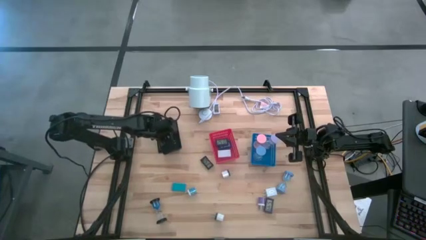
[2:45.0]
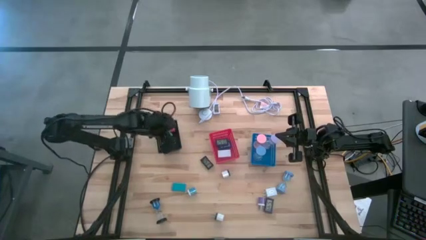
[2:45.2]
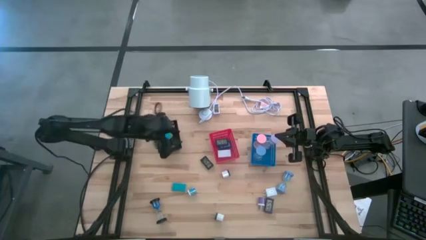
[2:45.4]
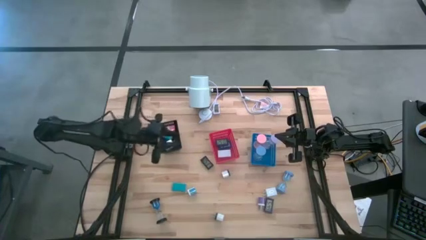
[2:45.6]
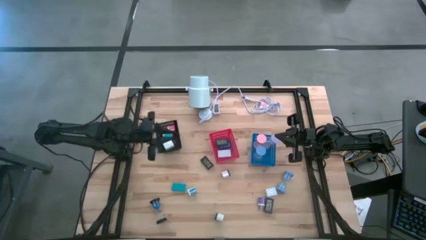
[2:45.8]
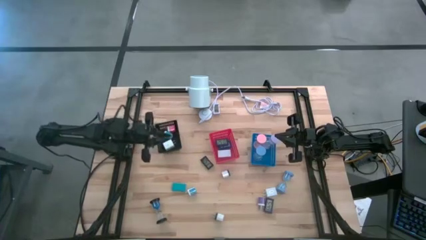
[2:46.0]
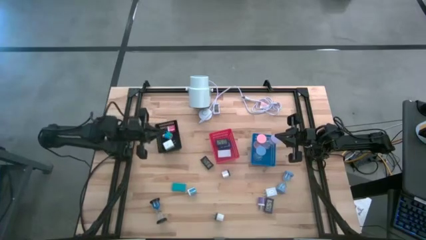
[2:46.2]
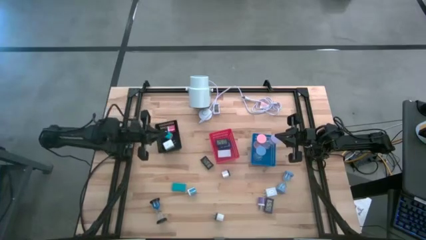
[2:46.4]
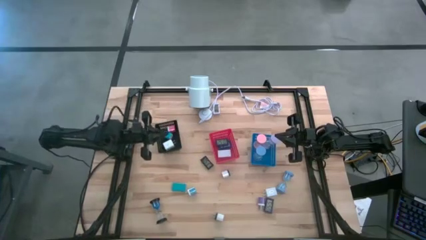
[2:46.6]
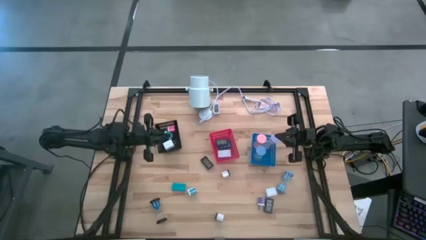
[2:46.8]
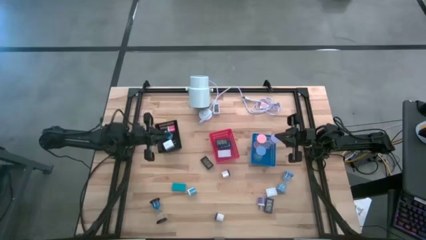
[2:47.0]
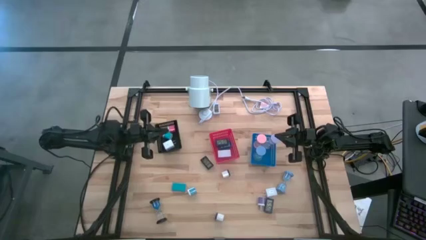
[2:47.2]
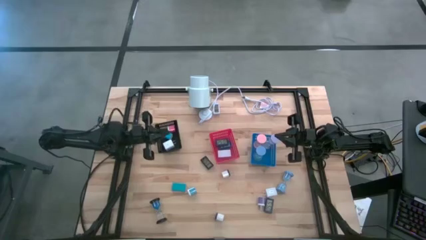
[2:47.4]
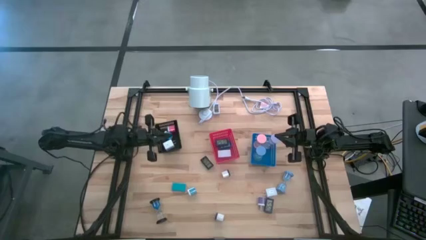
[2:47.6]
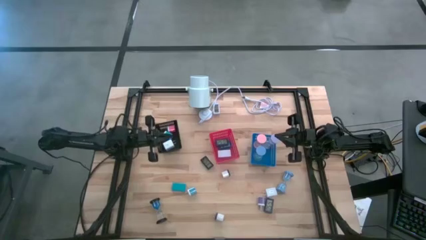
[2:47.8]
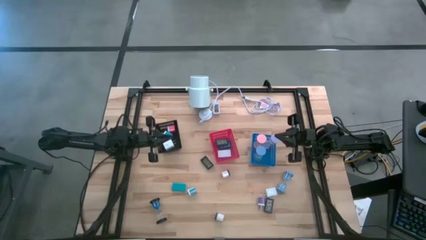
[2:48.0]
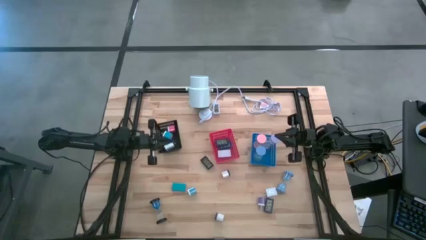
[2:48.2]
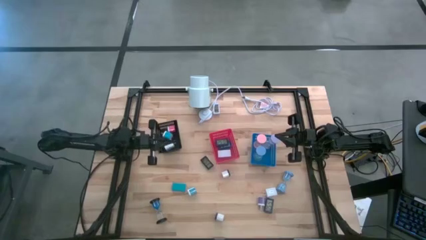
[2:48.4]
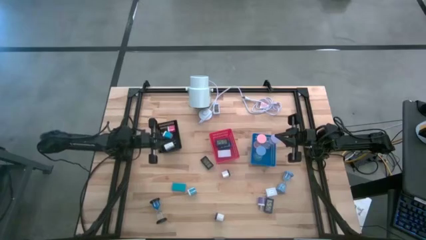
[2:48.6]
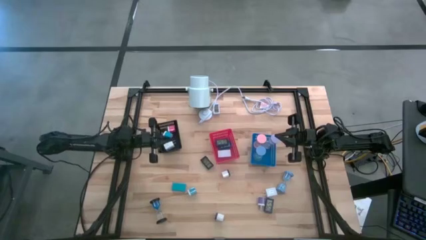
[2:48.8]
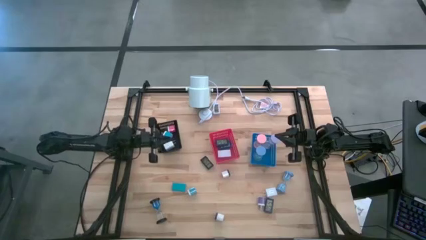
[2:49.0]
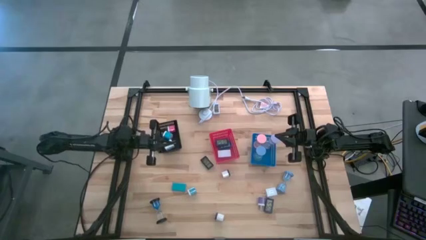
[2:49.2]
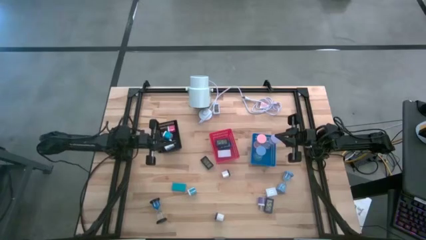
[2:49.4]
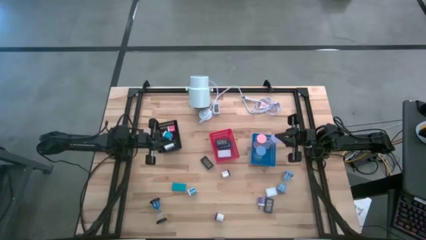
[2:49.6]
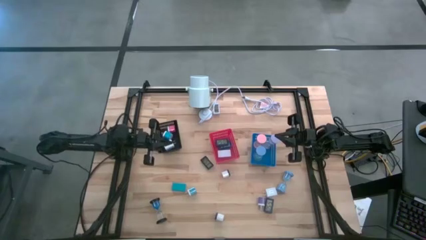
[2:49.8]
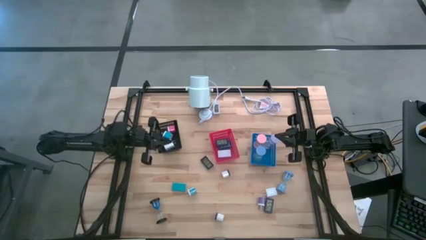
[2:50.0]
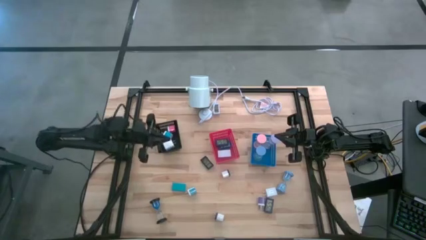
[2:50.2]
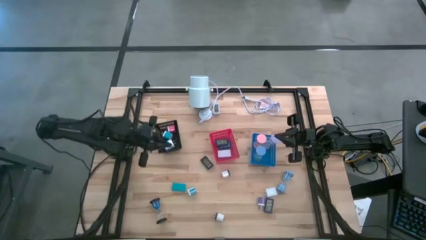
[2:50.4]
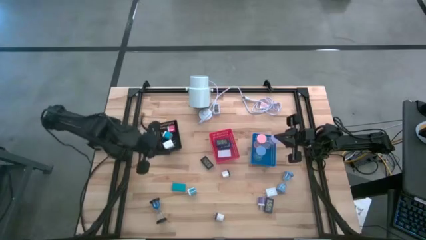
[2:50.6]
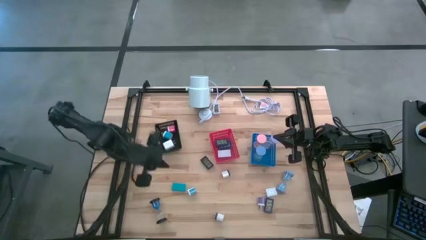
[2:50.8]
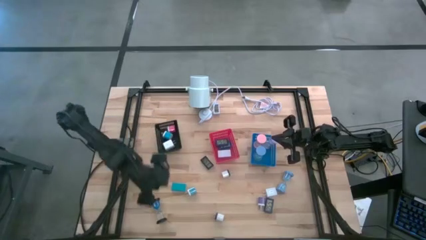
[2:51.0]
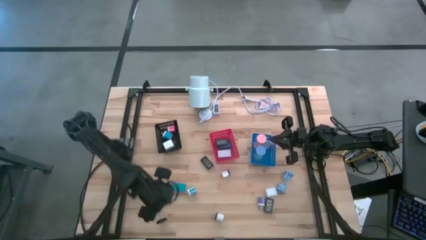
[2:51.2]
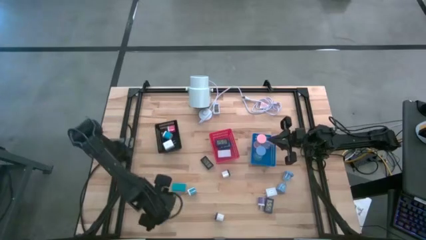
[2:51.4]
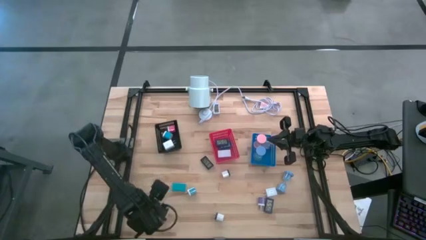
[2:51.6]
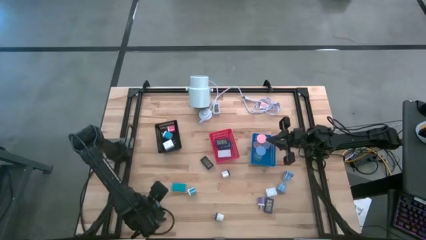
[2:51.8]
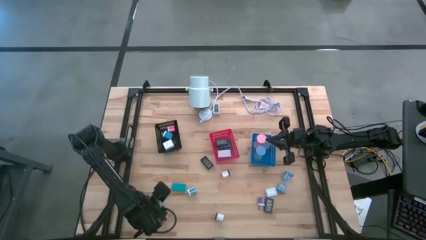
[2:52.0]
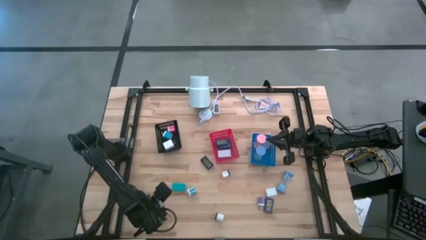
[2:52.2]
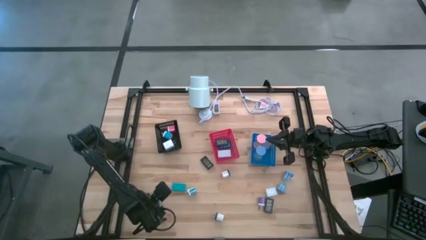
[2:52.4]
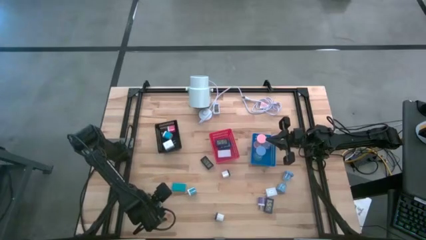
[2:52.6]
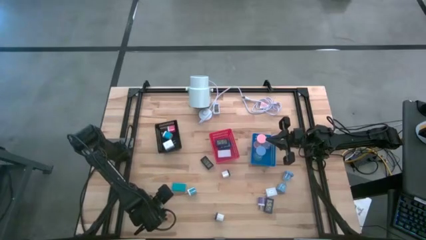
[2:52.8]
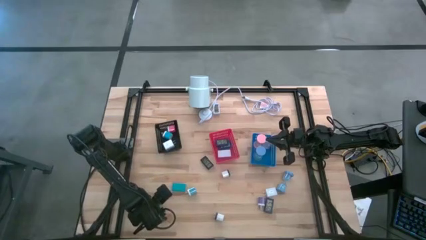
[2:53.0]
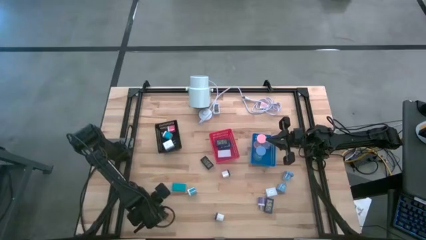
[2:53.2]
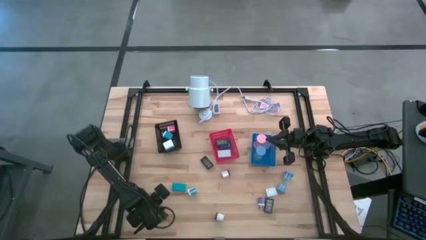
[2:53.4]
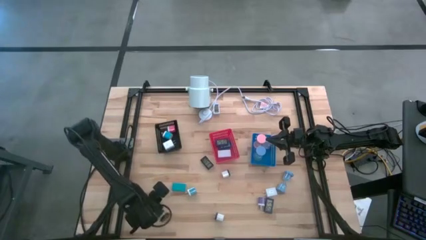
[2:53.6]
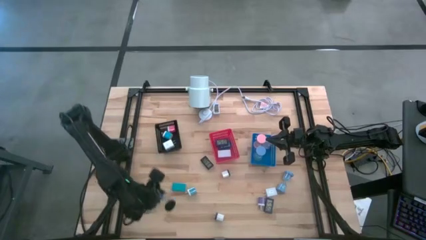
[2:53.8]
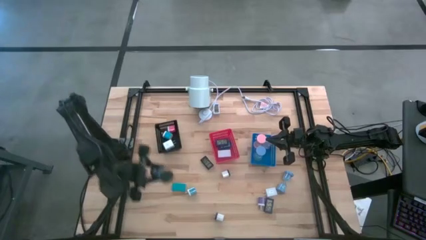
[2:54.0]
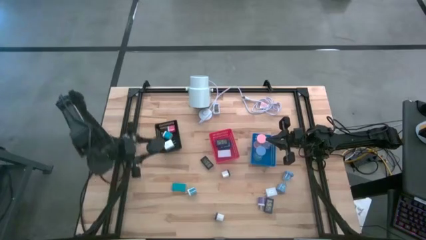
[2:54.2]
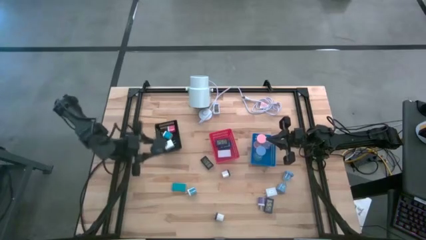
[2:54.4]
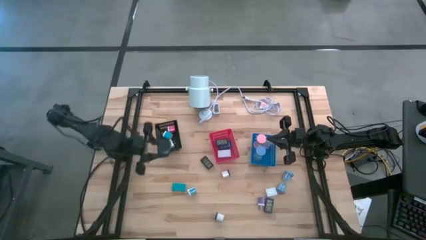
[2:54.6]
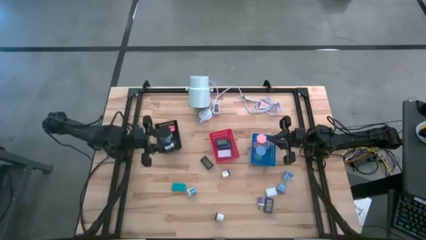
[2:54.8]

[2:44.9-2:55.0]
Task: Pick & Place Office items
Put the black hourglass into the blue bin

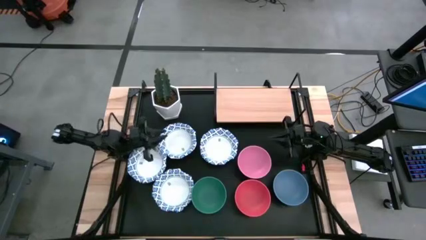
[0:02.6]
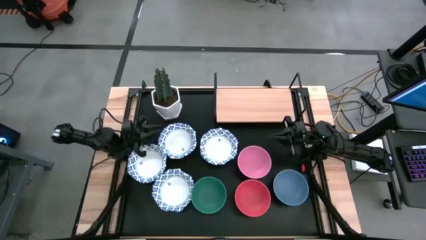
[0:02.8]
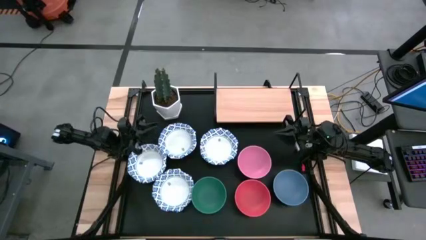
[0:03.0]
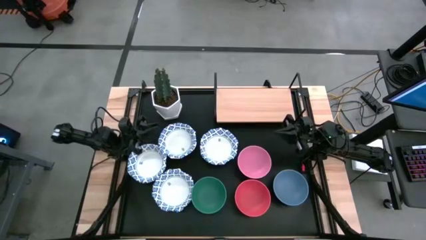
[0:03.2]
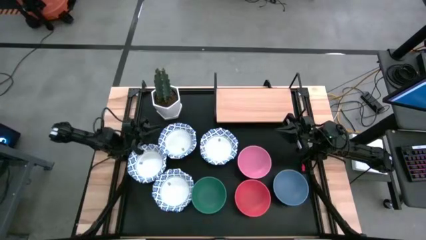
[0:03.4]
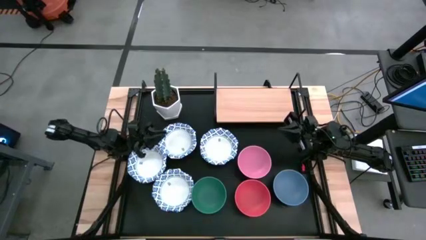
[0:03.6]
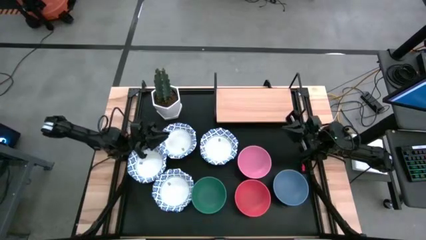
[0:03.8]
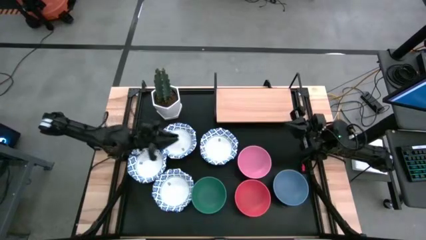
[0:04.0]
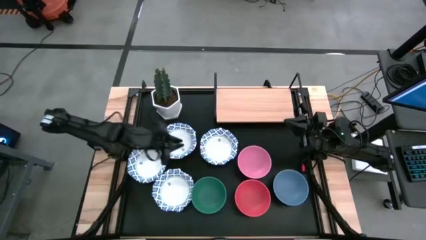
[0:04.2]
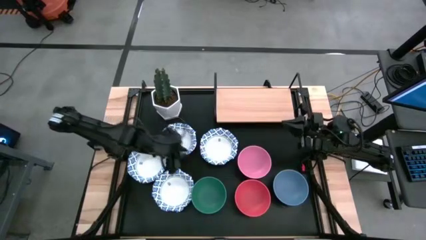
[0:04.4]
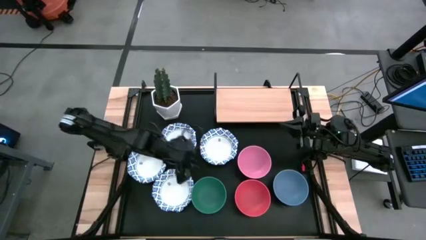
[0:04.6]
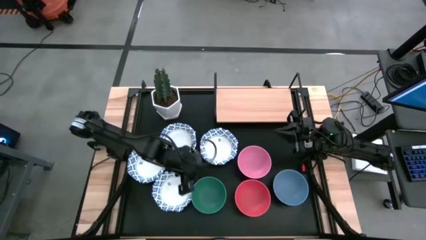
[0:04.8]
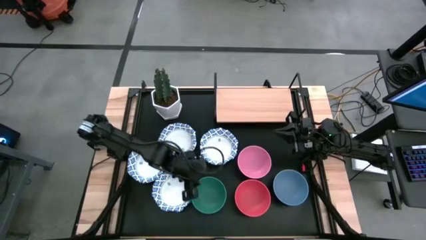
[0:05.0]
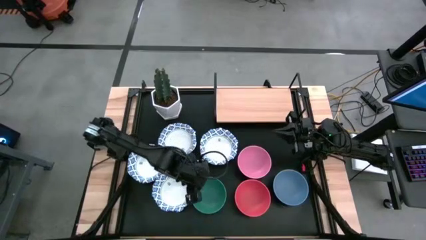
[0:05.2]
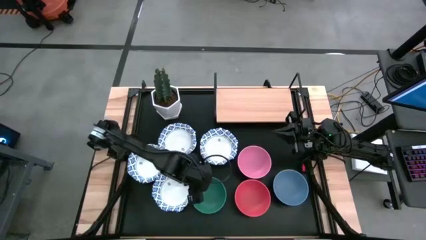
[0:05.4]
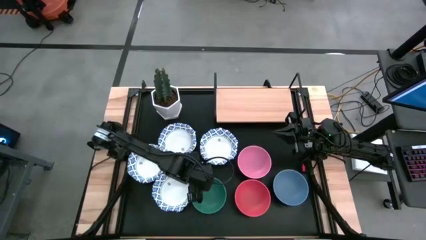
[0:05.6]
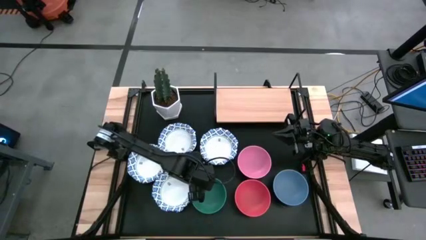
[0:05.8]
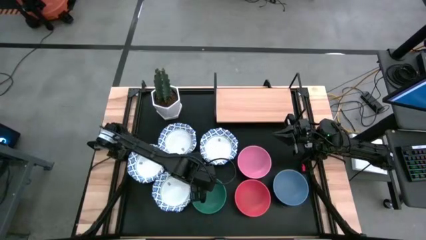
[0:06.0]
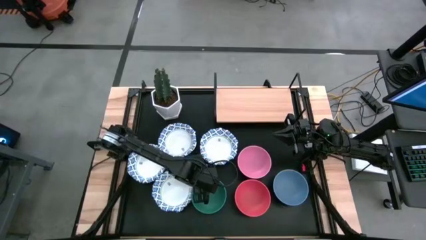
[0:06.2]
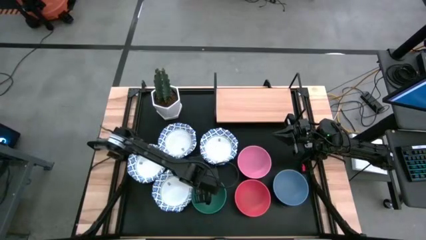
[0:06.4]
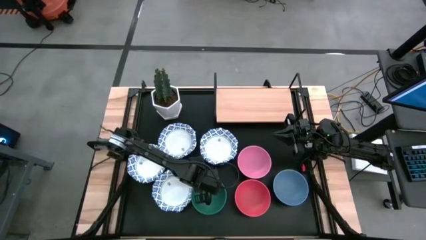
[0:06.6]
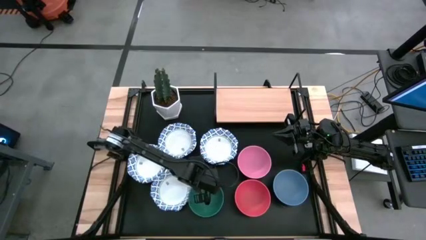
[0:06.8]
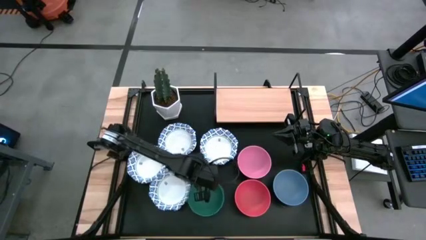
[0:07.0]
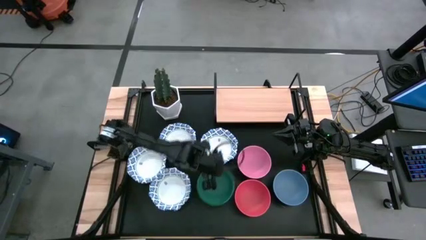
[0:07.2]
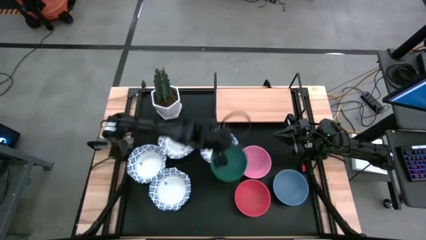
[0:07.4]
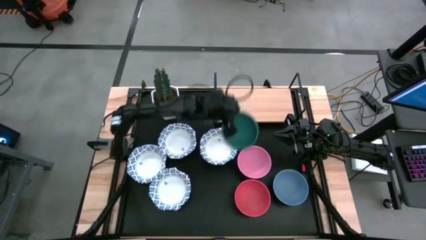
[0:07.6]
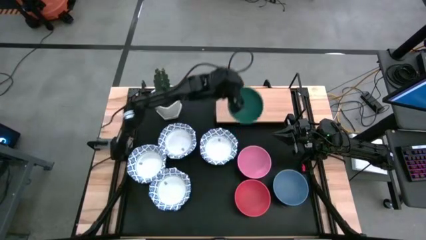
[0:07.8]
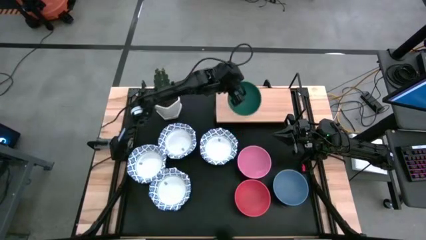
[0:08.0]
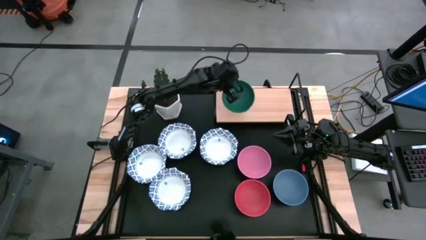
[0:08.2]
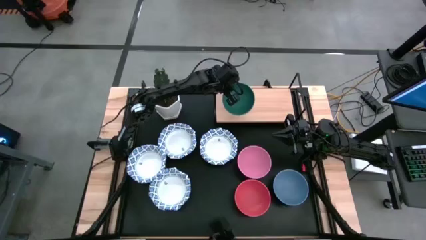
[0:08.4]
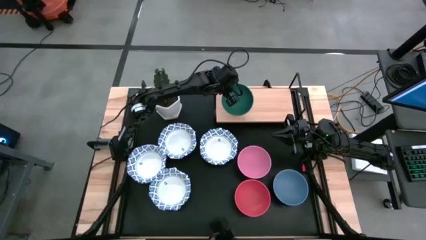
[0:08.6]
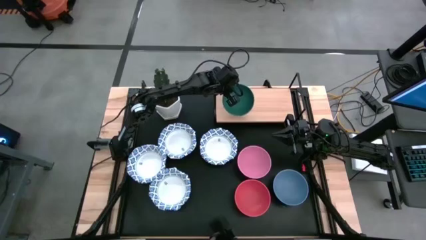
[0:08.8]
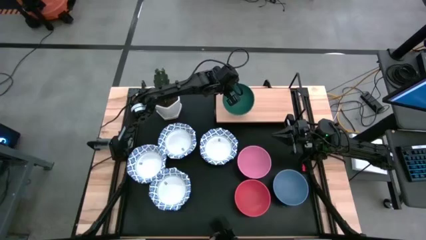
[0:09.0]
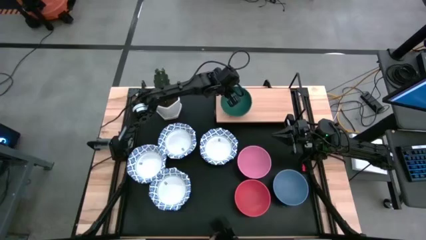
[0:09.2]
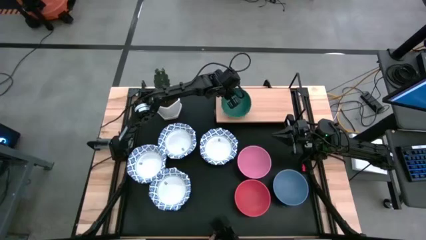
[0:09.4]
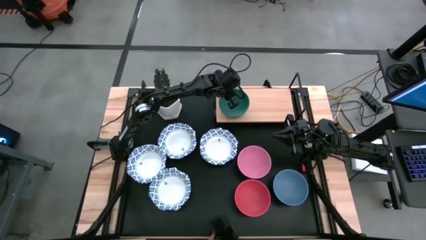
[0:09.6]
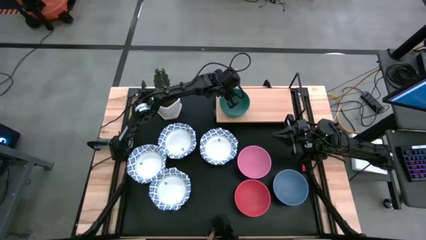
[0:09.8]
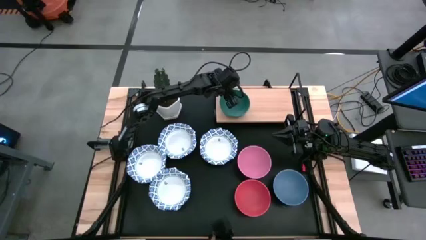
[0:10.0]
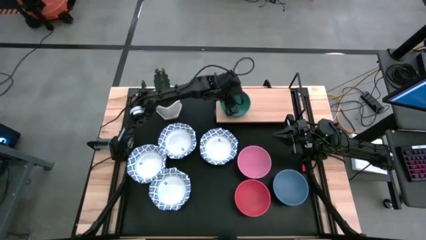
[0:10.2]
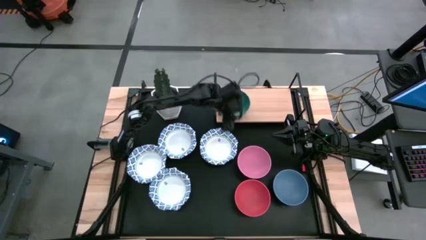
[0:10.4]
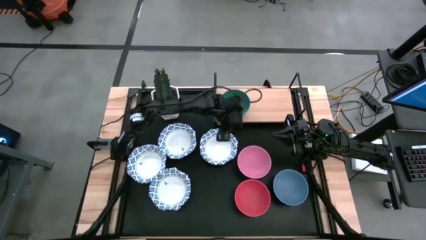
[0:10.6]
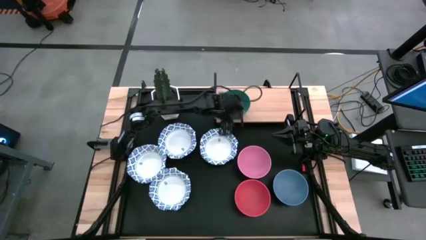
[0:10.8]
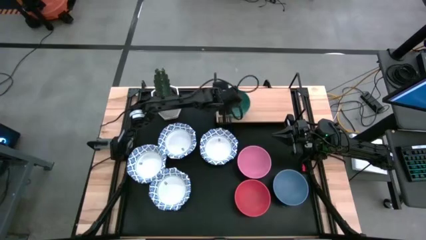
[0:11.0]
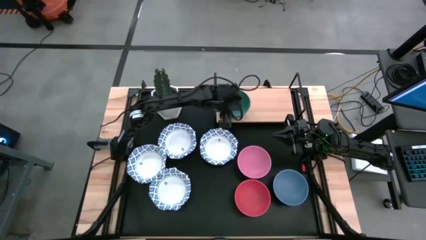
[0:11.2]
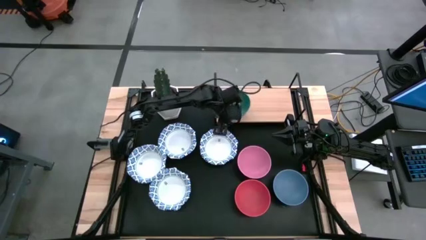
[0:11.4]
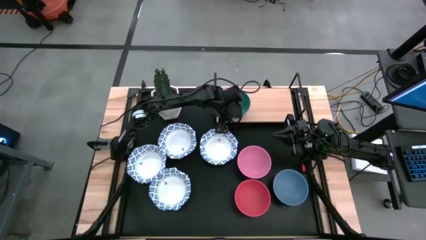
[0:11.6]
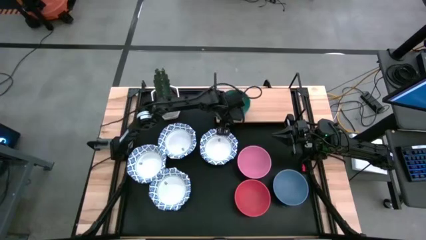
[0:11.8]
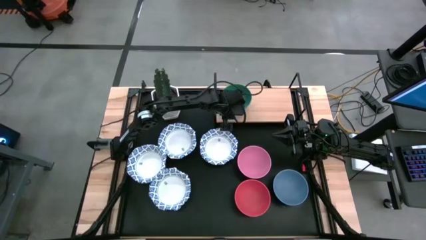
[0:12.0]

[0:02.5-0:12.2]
Task: Place and stack bowls onto a shelf
Put the green bowl on the shelf
